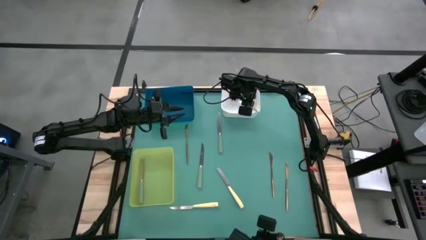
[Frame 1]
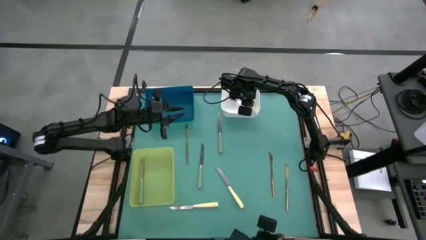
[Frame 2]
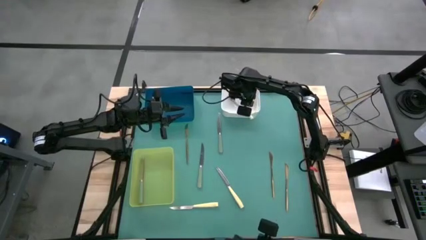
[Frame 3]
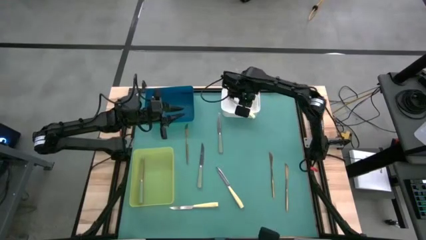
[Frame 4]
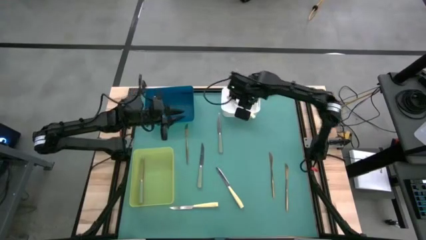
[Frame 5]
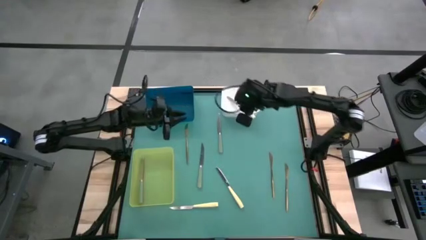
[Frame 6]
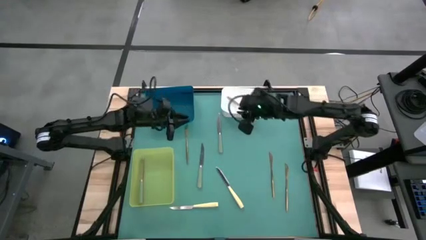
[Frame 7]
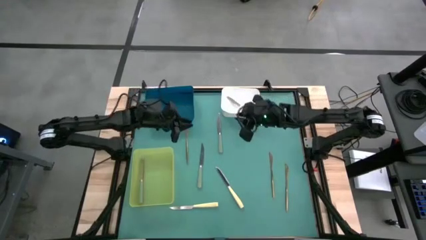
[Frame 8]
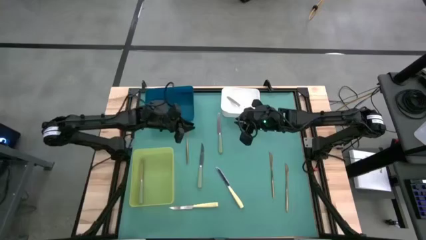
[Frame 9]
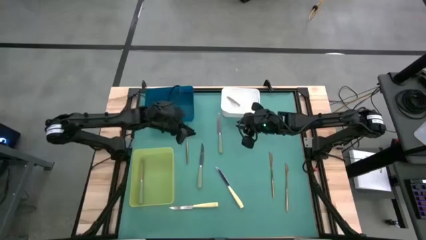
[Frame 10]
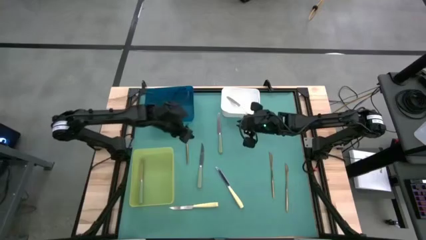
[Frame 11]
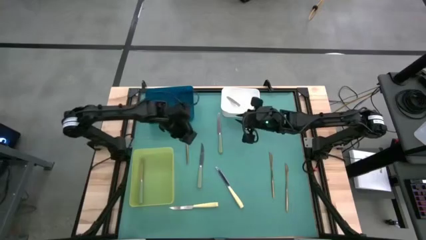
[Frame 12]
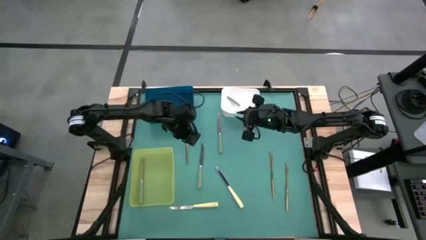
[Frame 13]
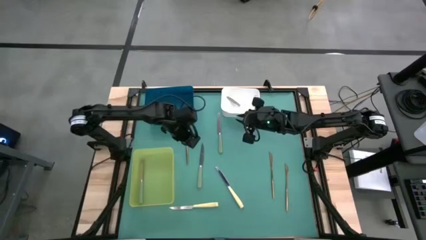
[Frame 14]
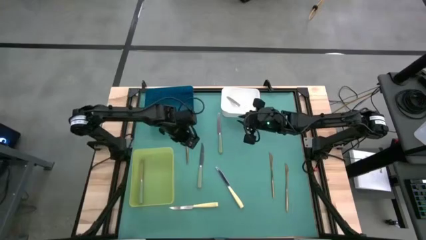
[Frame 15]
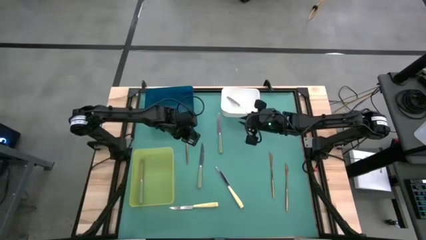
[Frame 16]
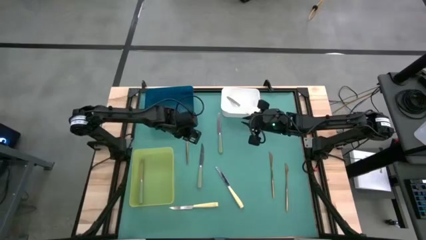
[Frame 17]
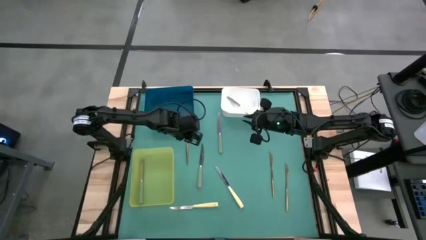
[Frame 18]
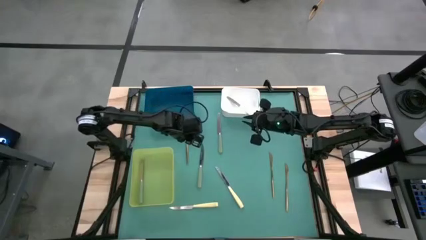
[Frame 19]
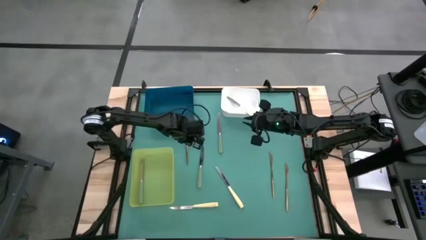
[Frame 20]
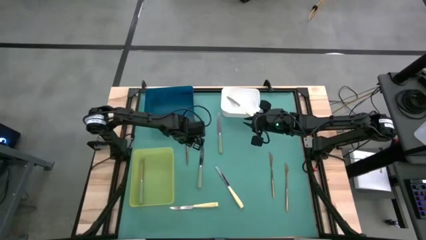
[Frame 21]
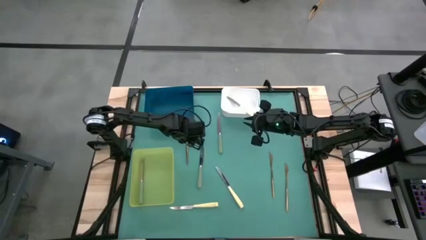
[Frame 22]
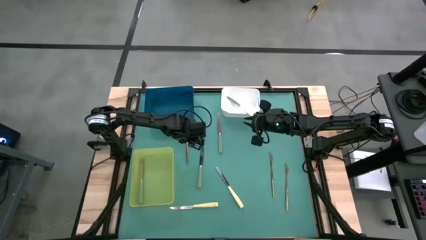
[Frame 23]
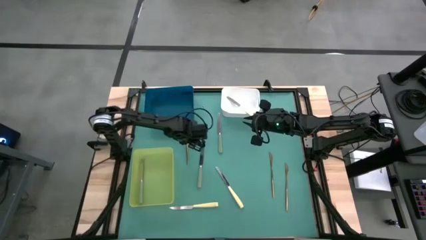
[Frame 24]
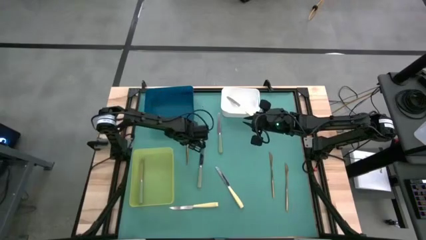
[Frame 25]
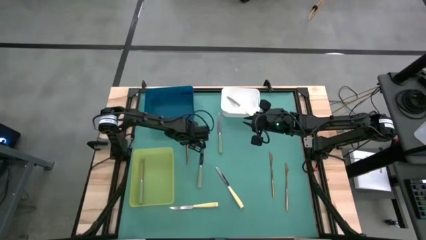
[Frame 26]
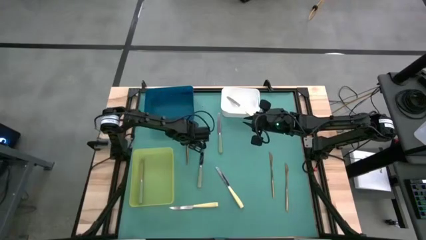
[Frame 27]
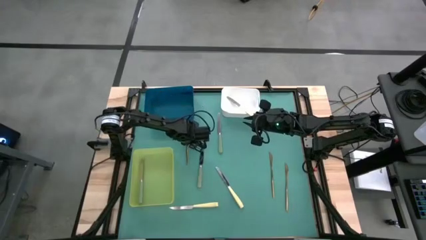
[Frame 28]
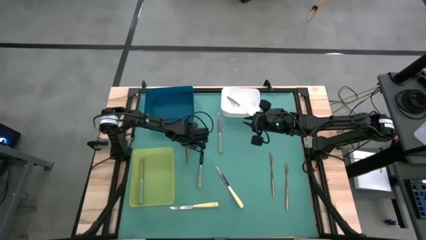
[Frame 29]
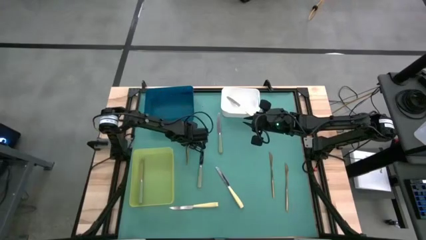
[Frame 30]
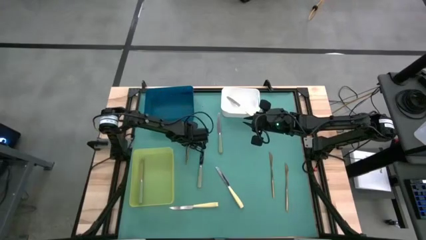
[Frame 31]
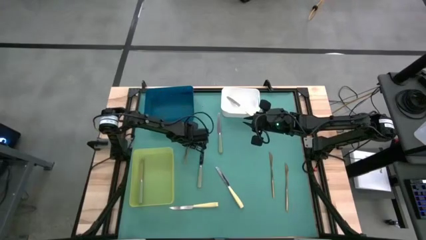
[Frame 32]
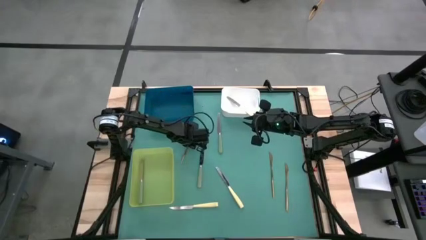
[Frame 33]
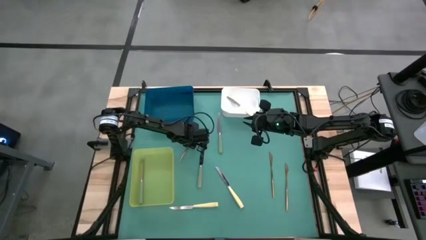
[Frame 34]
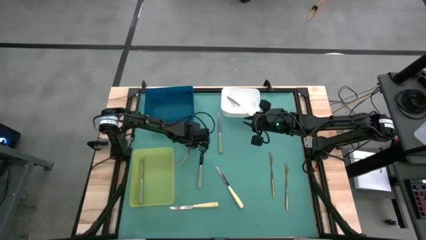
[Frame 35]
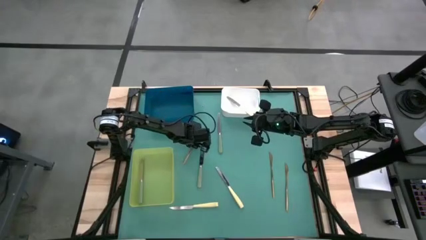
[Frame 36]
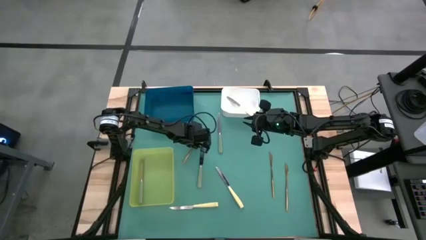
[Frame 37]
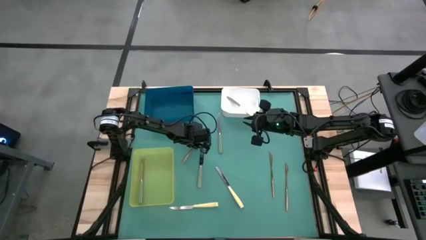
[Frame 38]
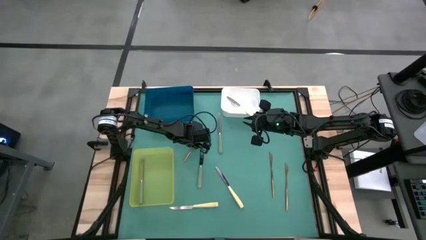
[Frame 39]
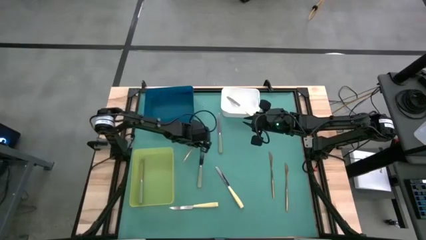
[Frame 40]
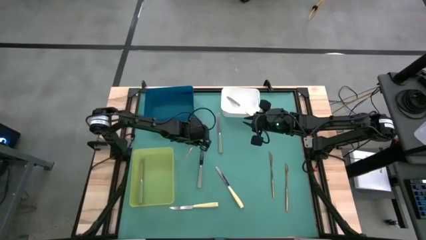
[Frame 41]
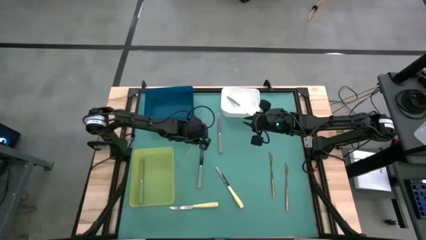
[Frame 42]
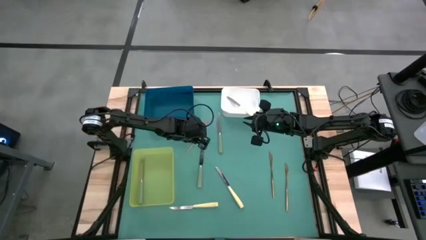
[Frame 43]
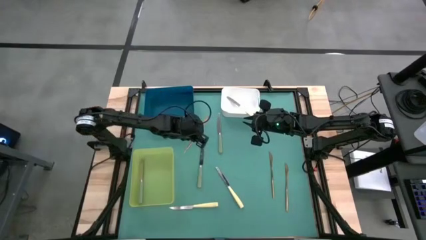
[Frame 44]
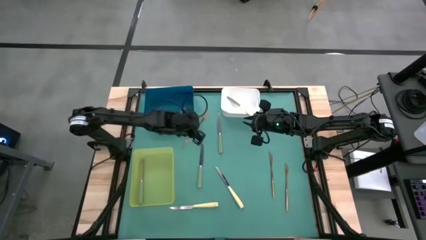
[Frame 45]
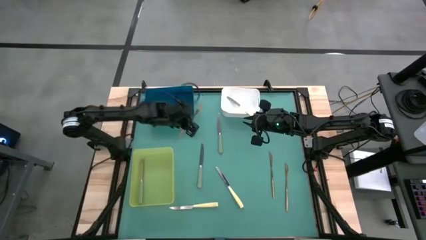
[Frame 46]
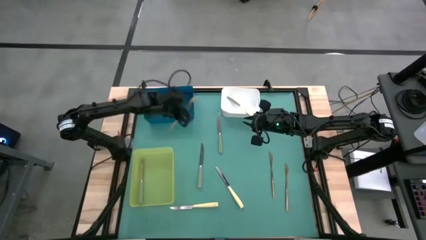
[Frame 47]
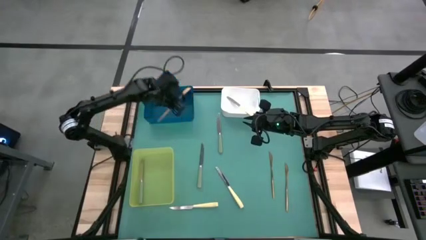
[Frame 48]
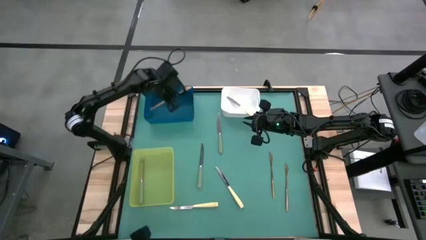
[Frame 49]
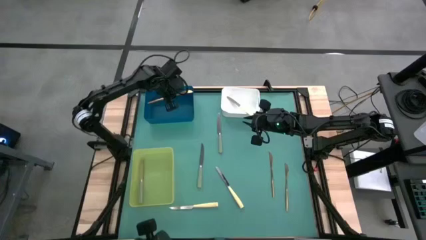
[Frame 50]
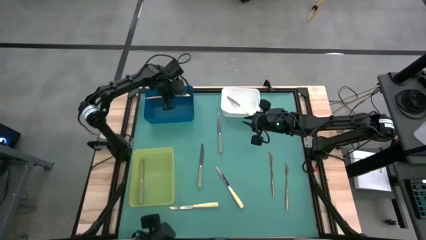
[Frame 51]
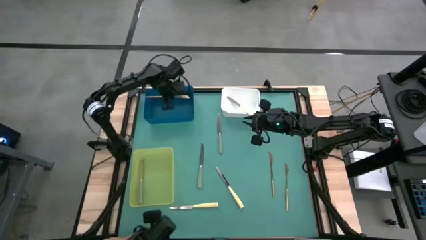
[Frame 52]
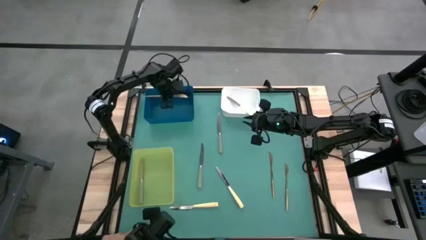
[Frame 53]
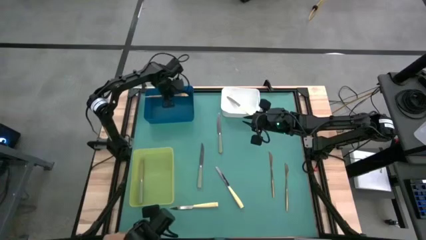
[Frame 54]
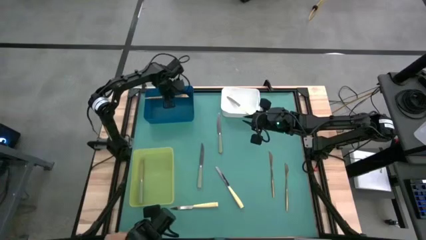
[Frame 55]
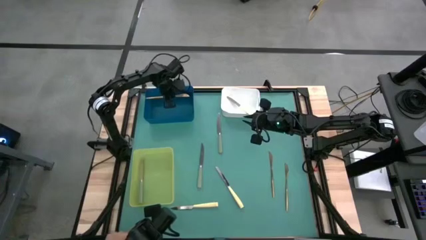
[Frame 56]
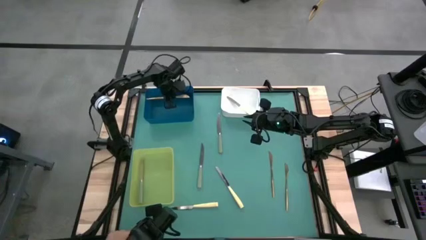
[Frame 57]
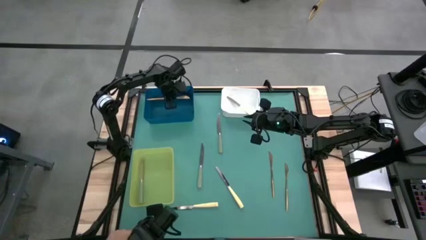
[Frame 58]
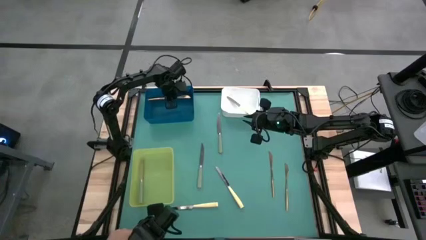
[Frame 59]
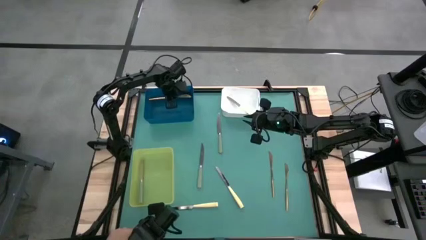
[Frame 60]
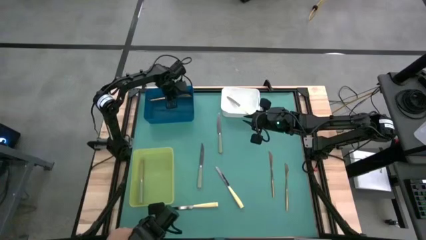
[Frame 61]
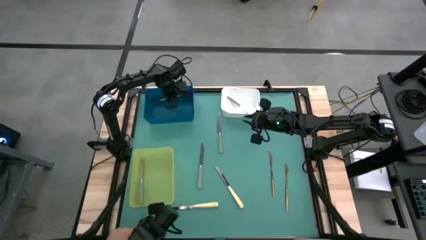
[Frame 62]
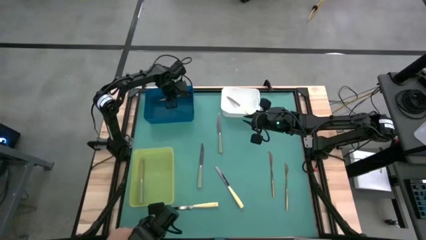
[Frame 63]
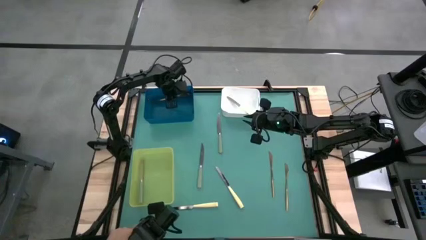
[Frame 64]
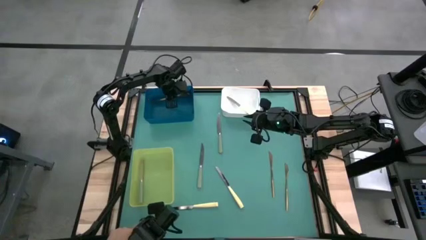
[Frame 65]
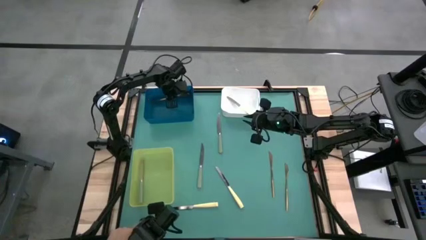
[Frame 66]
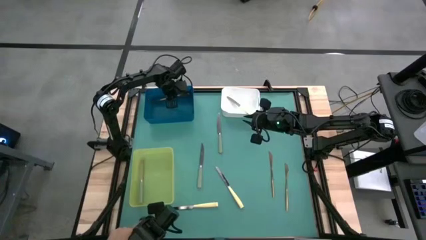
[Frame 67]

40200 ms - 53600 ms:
Task: Sort silverware by color (type)
Put the left gold knife into the blue bin

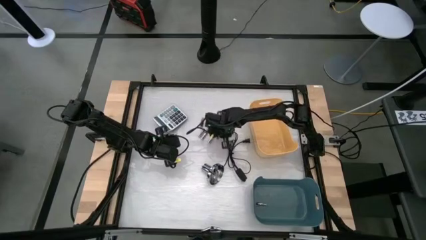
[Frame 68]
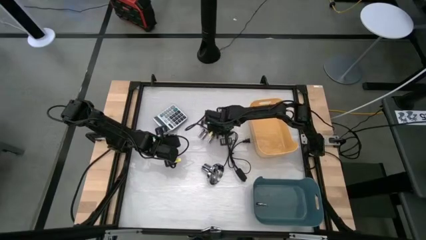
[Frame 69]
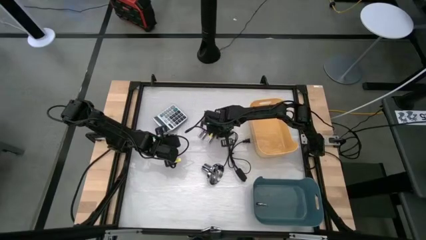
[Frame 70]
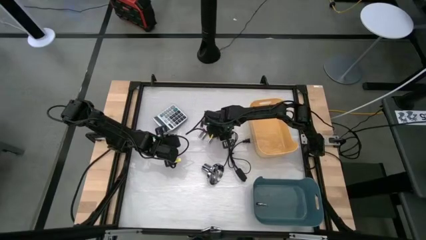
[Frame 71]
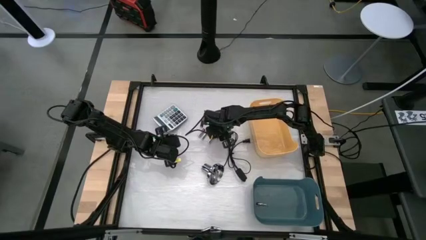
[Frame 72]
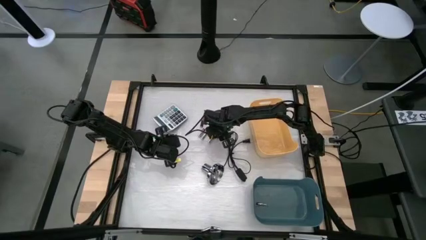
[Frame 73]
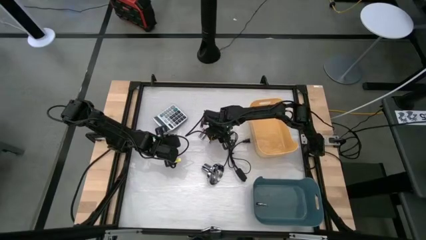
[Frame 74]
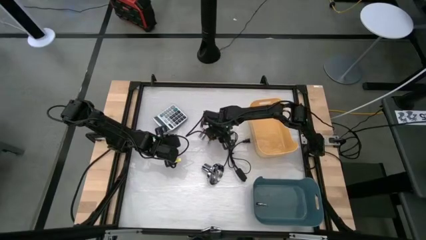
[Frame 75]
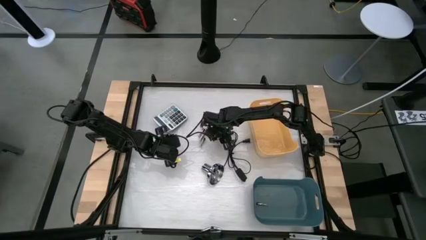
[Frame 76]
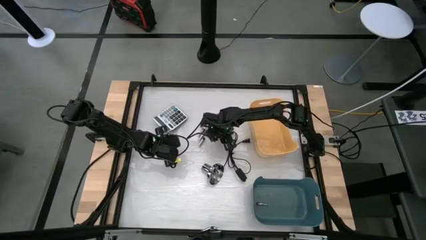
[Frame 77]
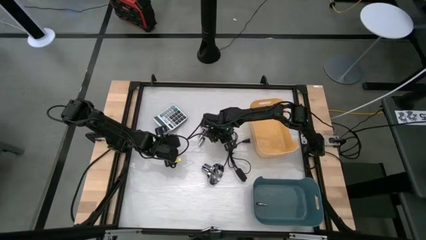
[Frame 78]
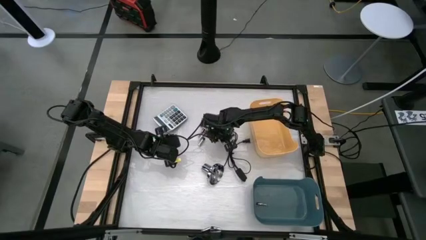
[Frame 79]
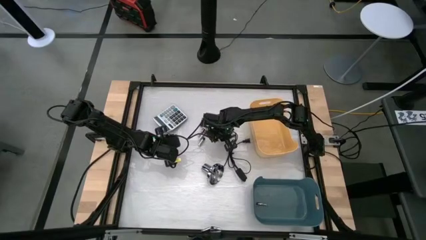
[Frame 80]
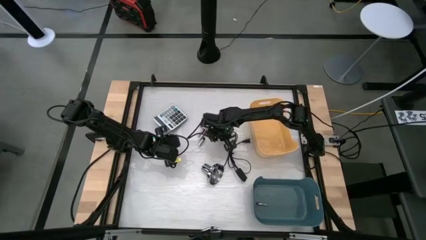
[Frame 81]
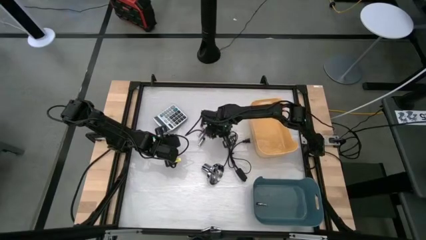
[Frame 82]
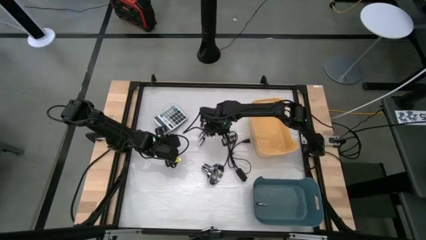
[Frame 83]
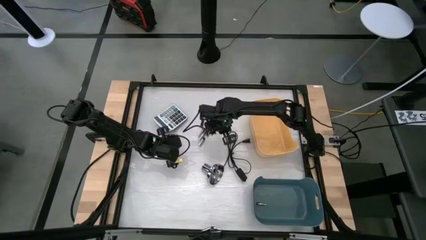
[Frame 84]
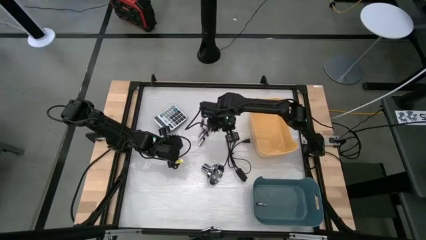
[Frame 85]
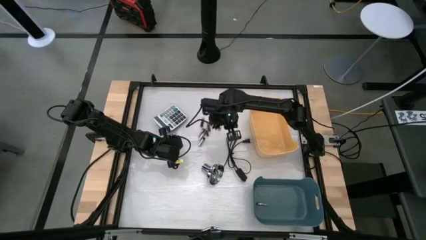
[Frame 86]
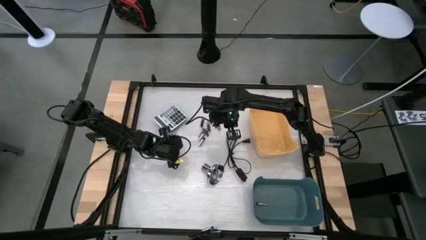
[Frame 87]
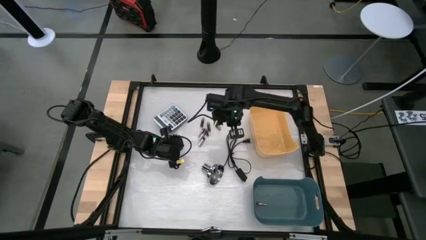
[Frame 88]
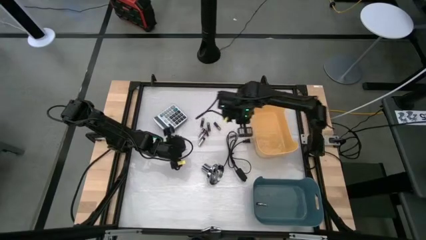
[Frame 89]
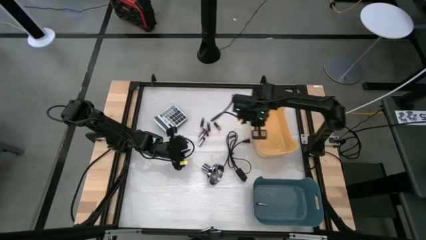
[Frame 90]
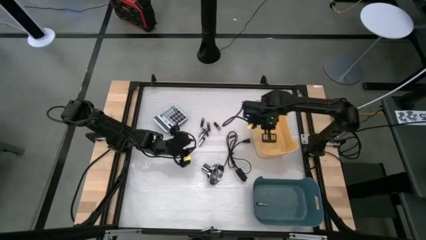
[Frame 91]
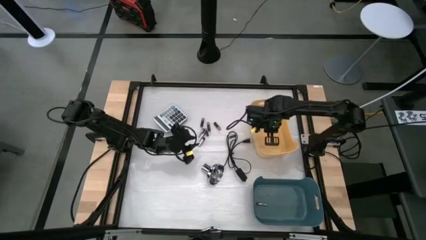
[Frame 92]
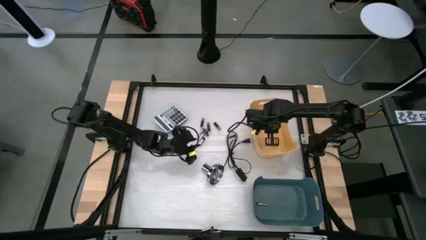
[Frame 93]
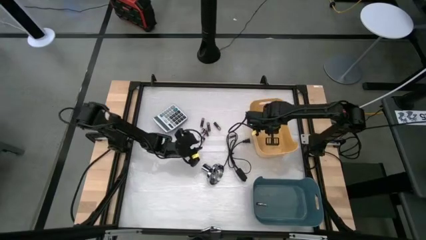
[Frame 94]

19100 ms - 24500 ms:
Task: Sort batteries
Put the black battery into the yellow bin
